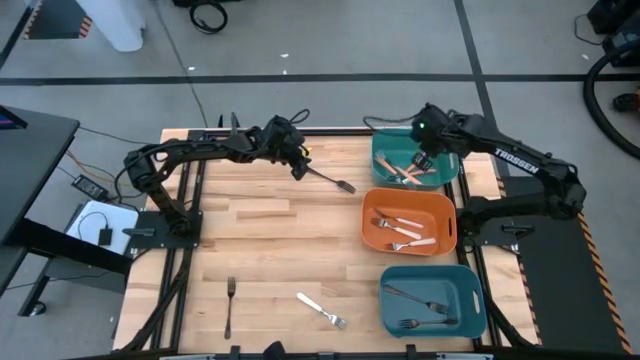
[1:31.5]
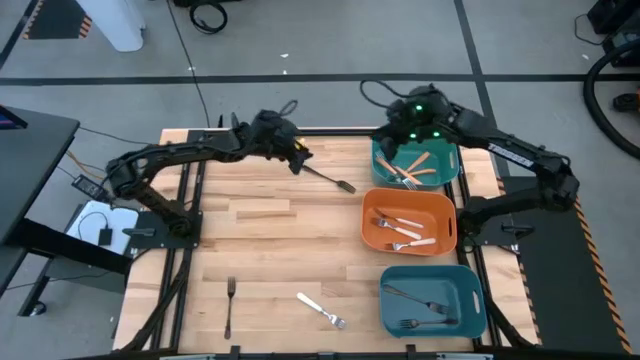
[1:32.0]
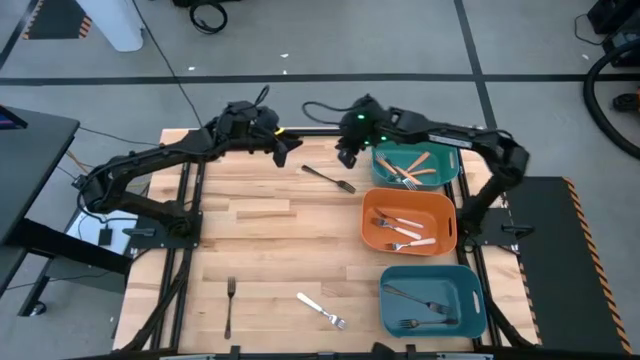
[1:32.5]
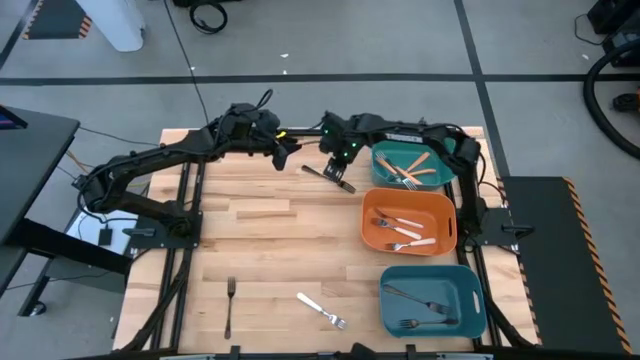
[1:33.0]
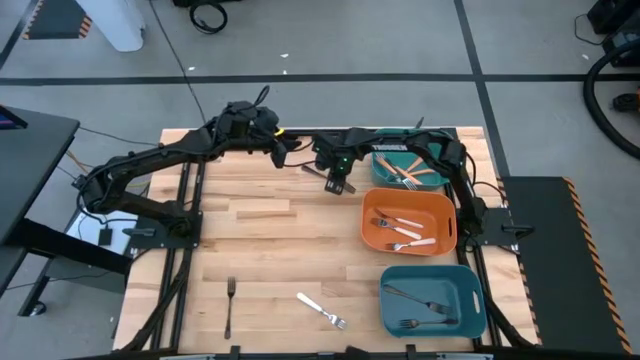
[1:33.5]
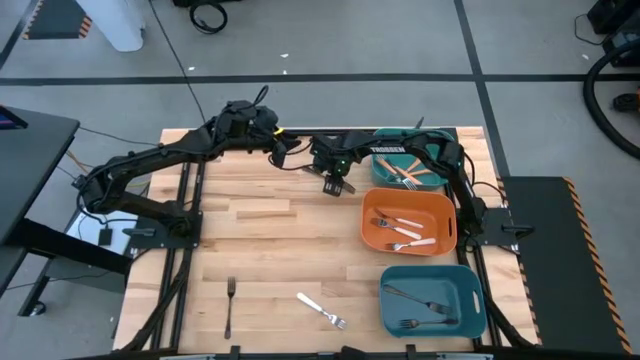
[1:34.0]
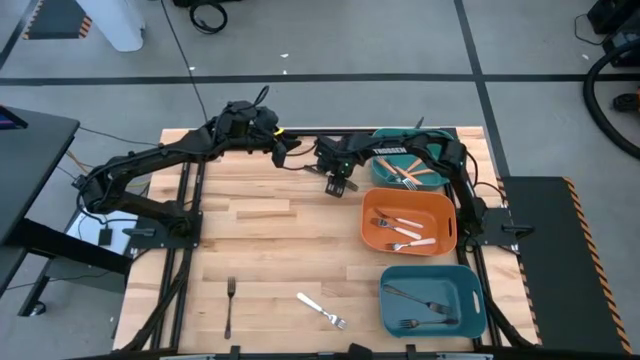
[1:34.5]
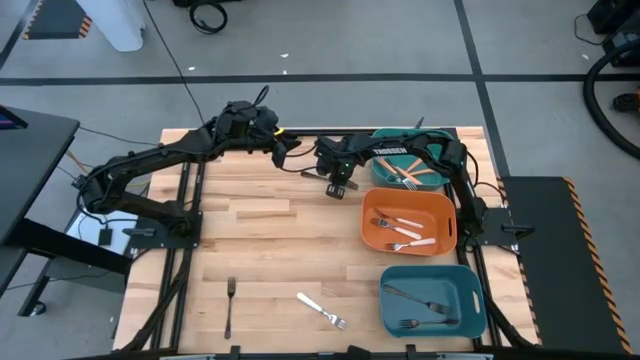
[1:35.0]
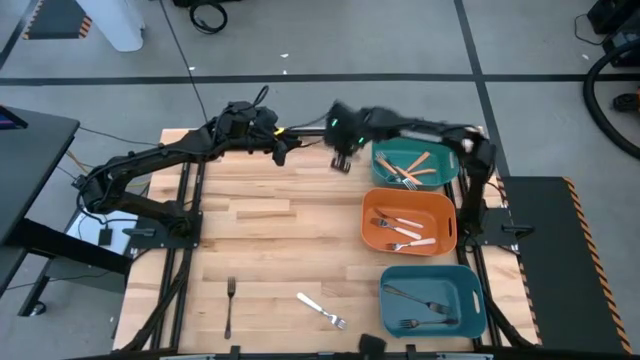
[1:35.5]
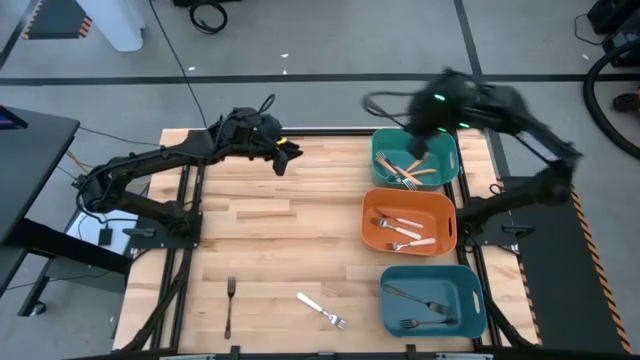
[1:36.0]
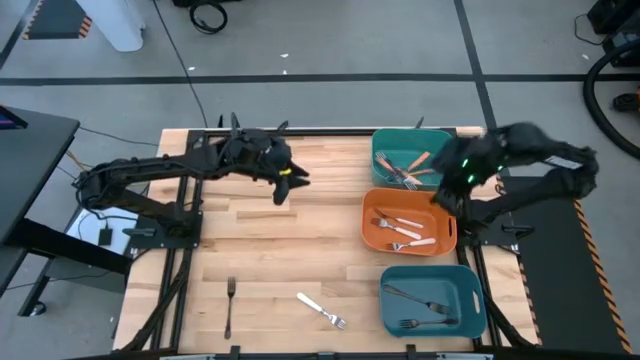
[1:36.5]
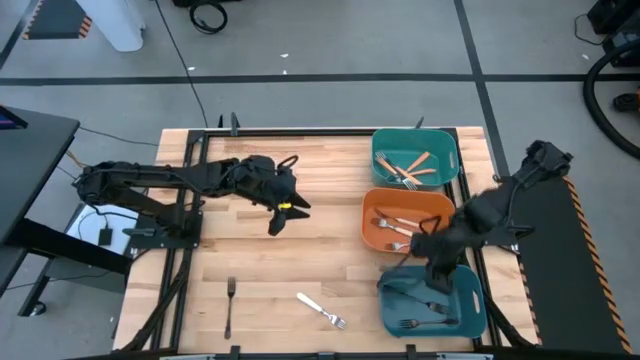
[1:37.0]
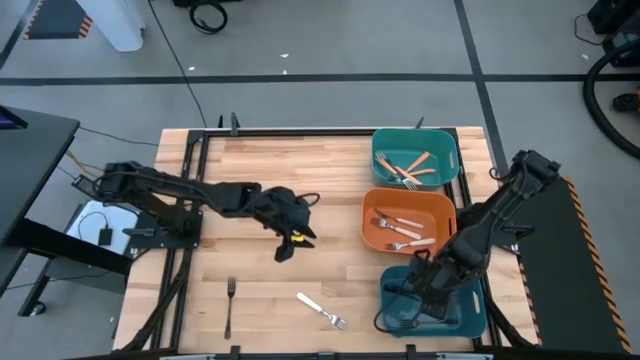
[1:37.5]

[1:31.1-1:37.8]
Task: Sort silverware by color (type)
Put the black fork into the blue bin

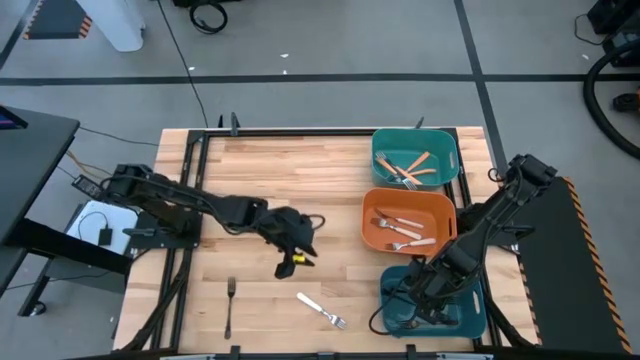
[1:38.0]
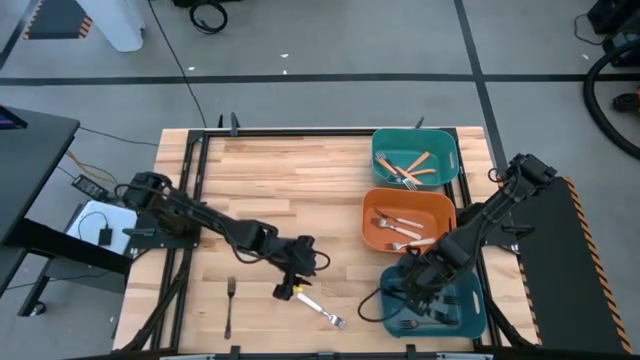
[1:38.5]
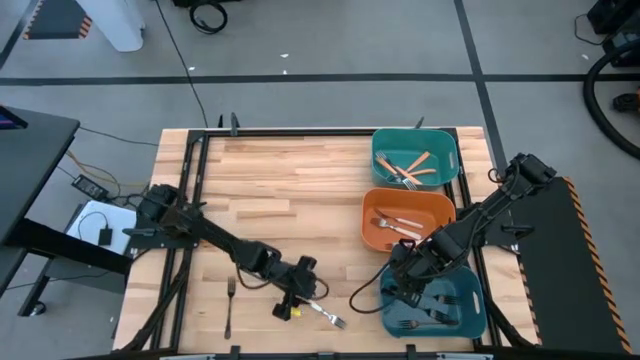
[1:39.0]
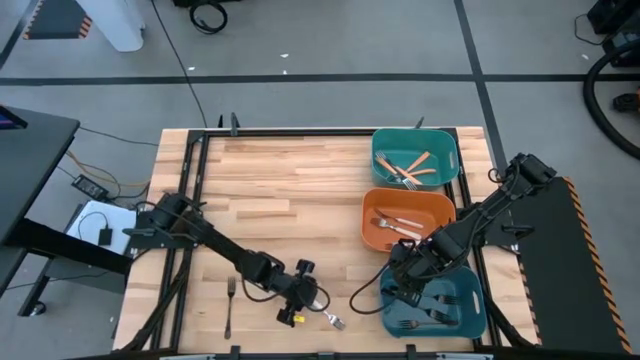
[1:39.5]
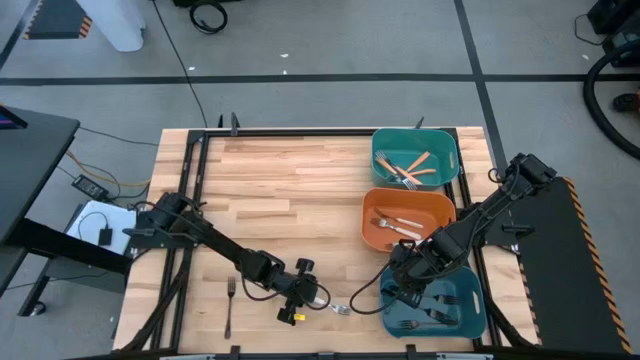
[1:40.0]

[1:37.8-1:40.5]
Put the white fork into the orange bin

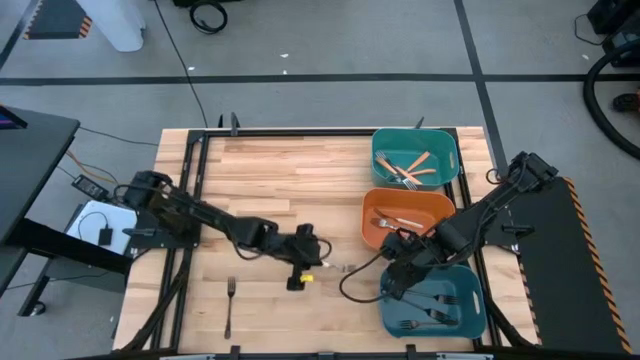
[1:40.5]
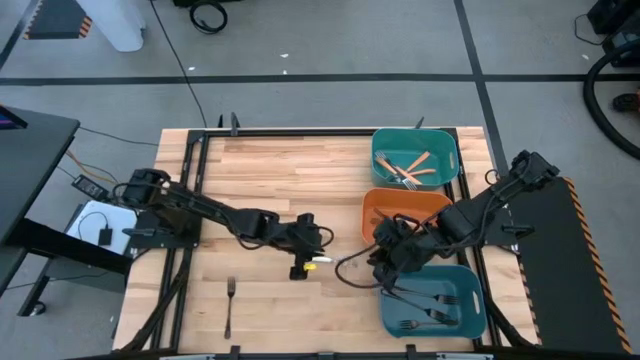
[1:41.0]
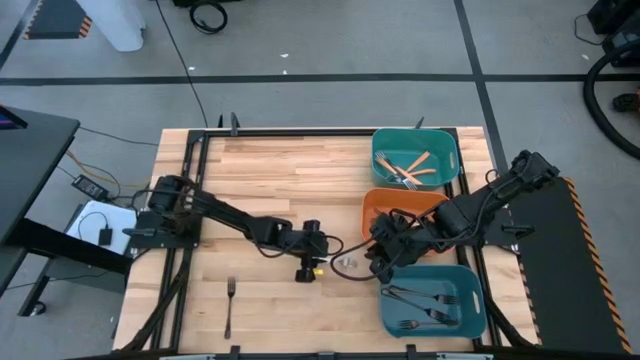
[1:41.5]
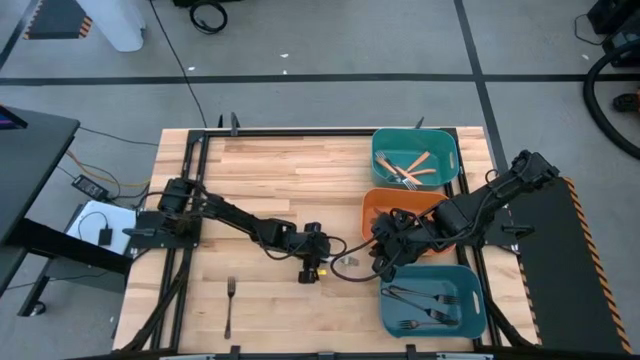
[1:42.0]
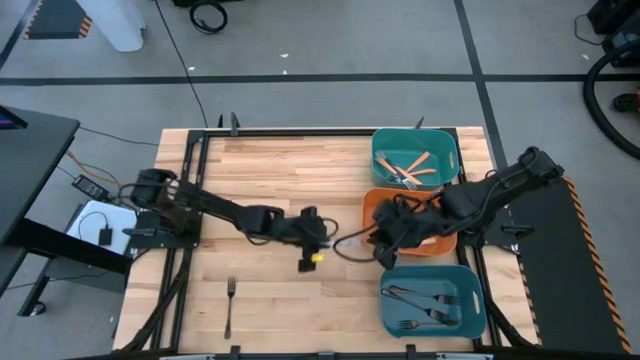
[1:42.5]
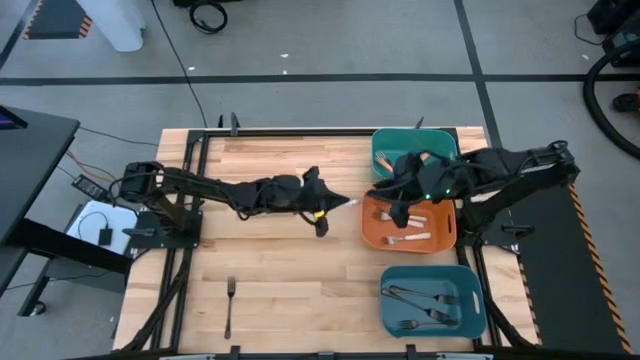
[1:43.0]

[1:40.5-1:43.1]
Put the white fork into the orange bin

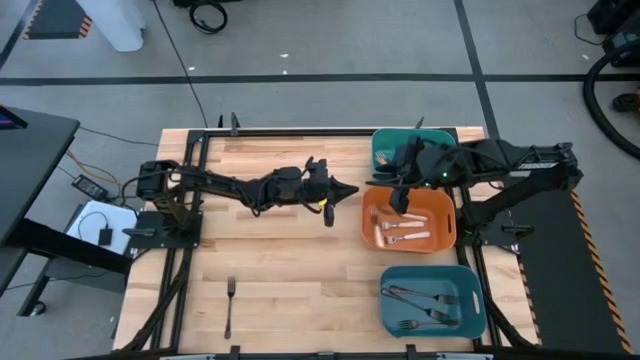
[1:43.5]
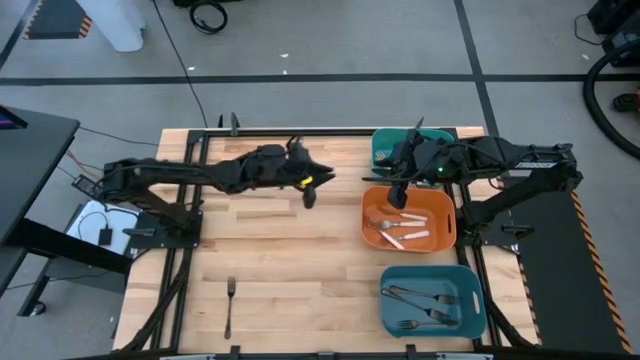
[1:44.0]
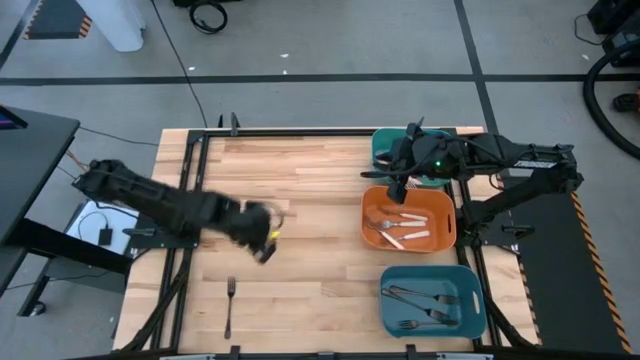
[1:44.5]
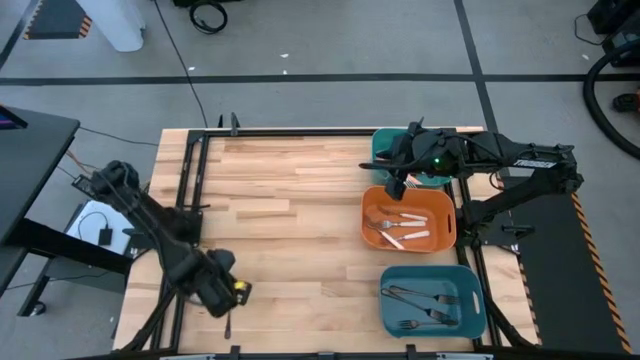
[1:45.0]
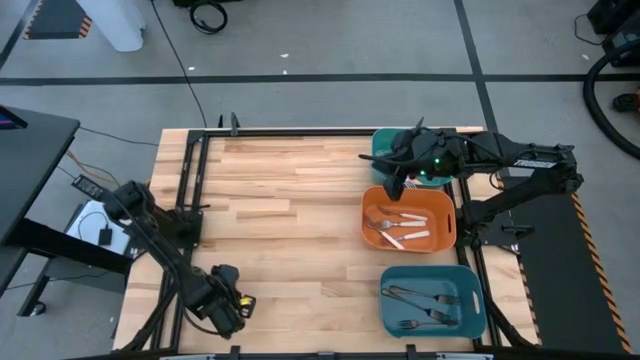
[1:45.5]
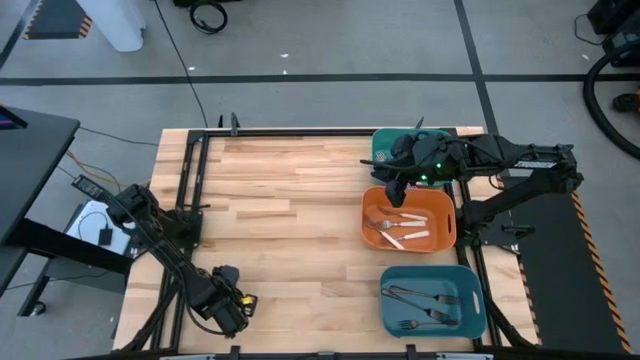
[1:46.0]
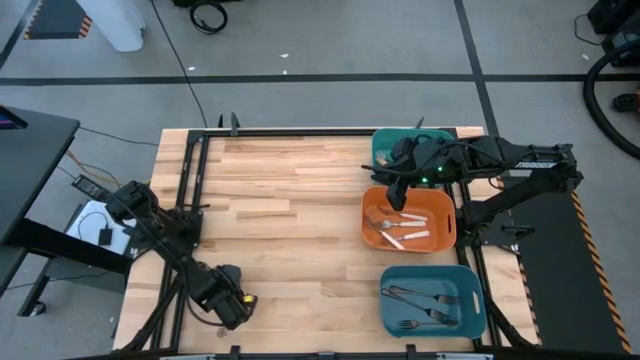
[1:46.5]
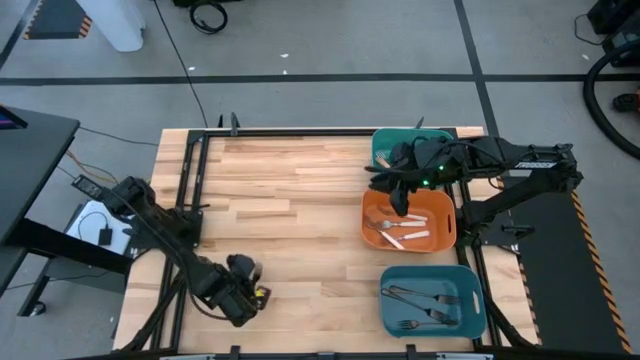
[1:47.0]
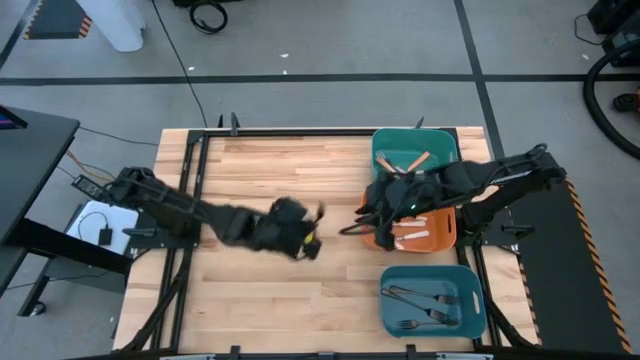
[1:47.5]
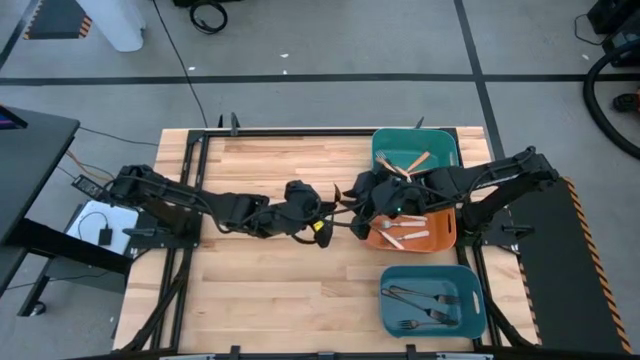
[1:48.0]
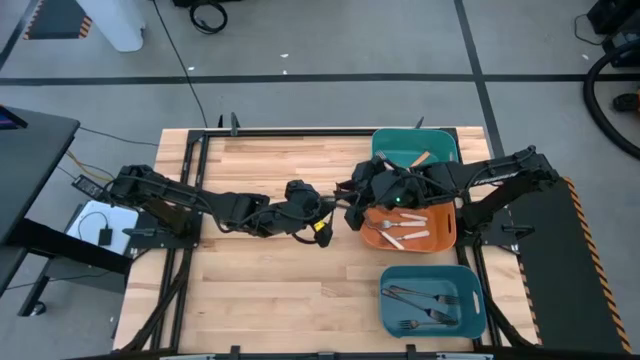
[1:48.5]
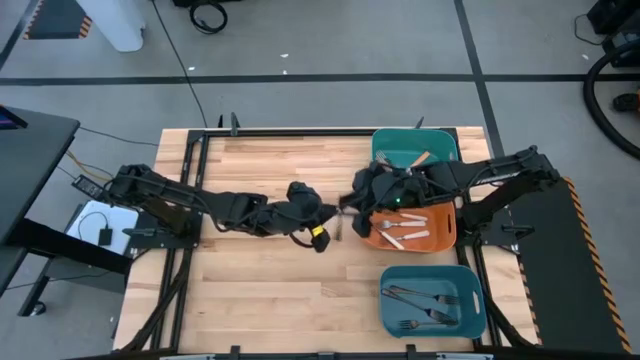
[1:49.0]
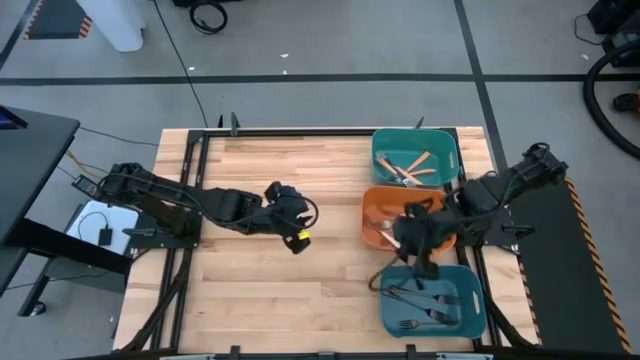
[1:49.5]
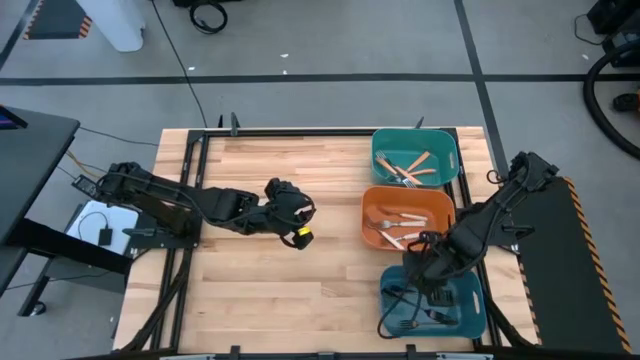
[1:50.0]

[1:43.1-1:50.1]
Put the black fork into the blue bin

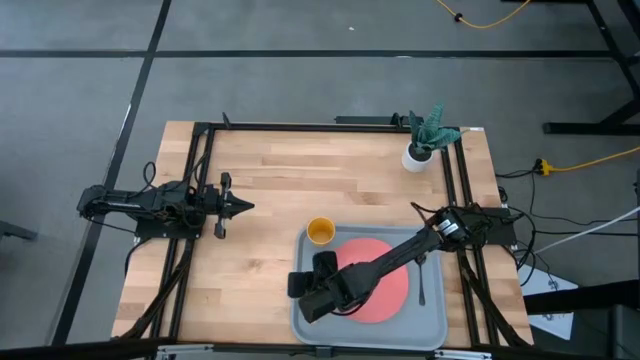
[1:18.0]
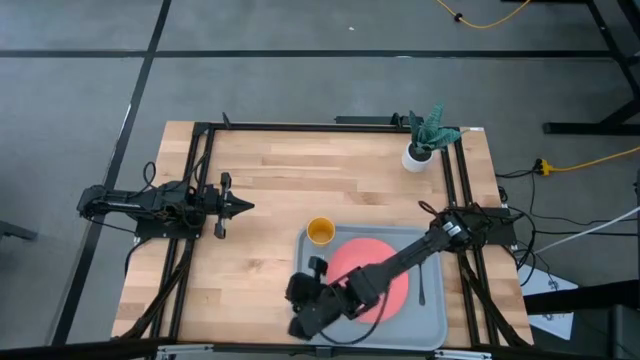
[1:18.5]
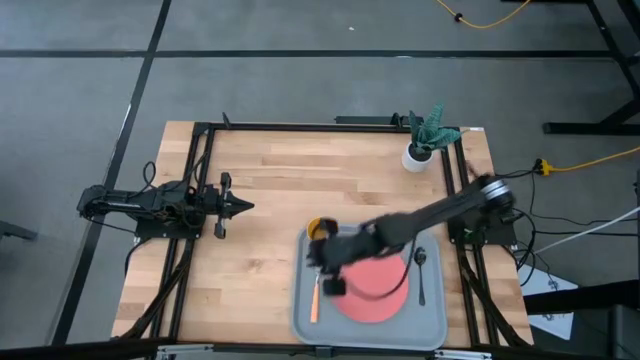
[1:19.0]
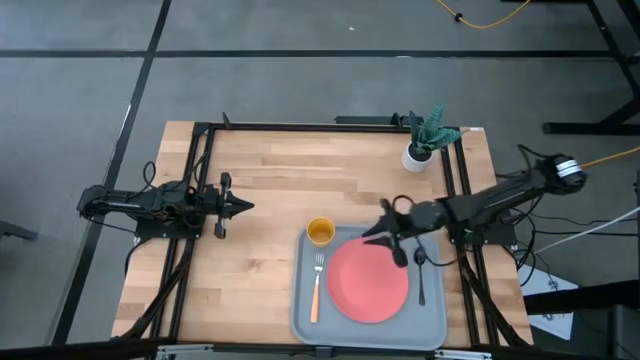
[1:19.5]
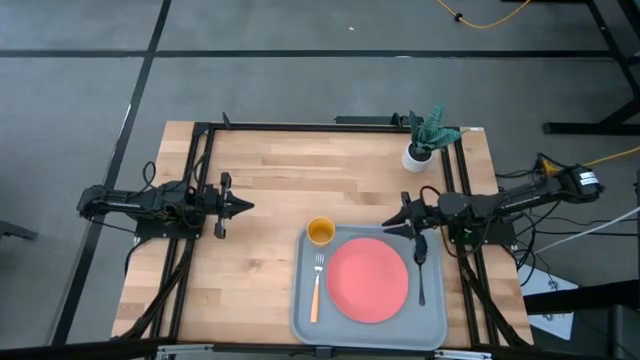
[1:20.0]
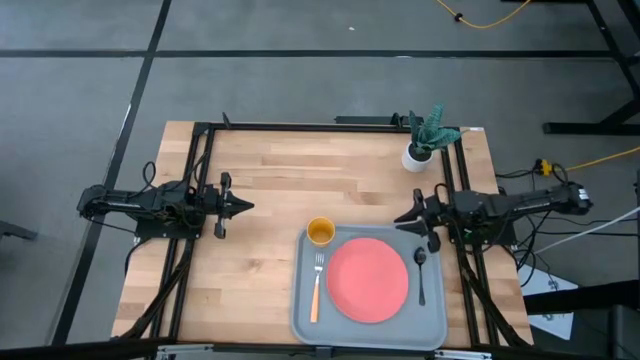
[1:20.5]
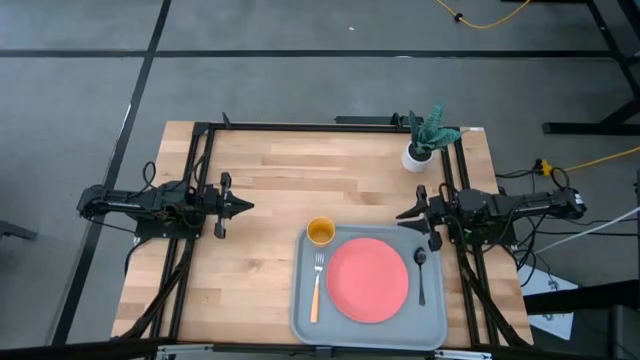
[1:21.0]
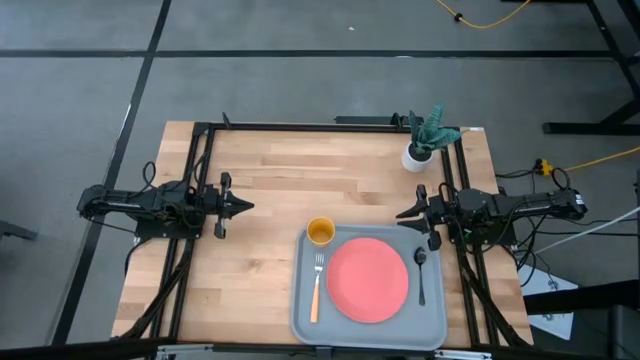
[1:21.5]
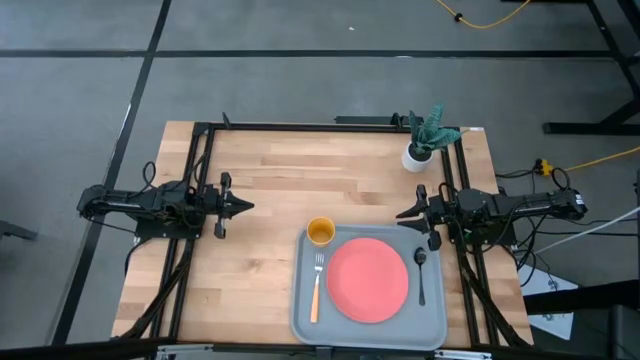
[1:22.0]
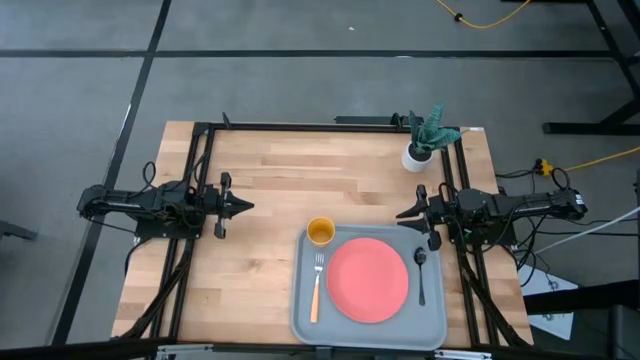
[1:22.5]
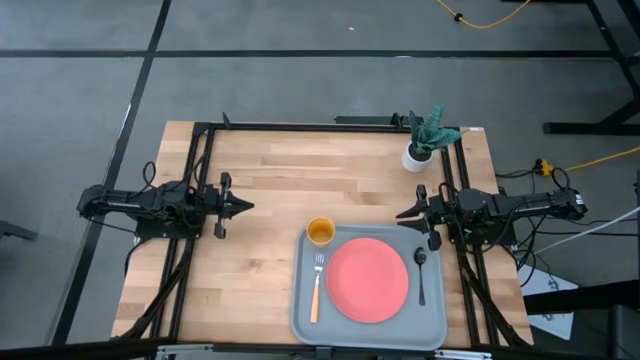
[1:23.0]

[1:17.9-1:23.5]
Task: Pick and place plate/cup/fork/spoon on tray
Return to home position
